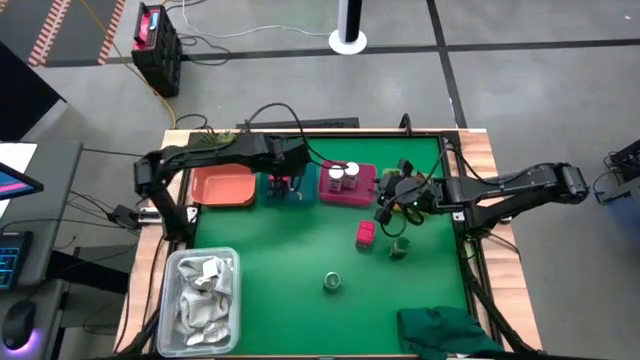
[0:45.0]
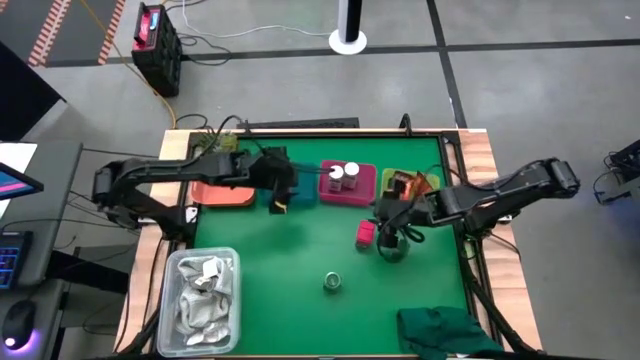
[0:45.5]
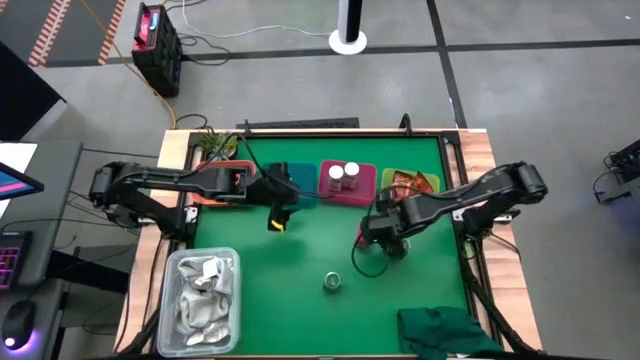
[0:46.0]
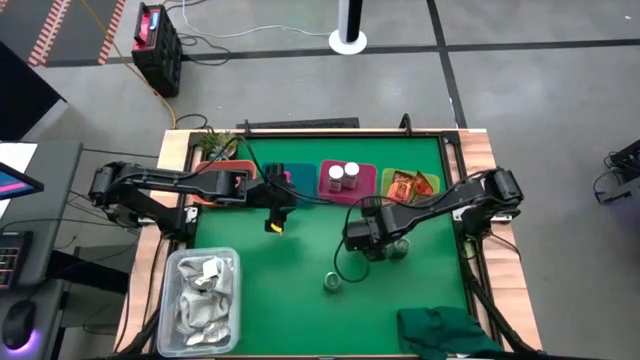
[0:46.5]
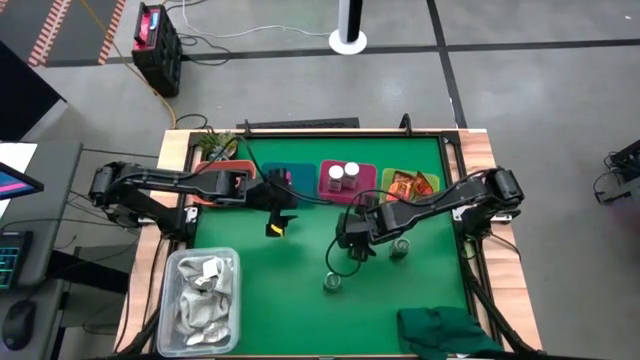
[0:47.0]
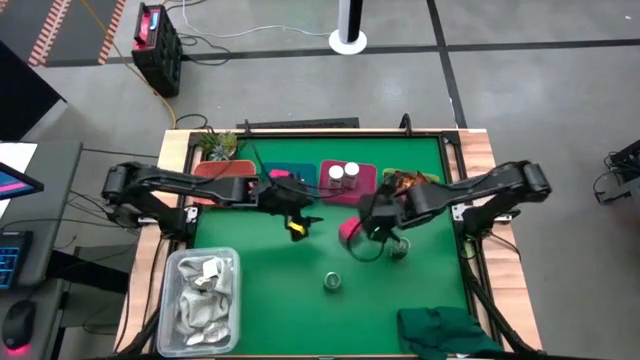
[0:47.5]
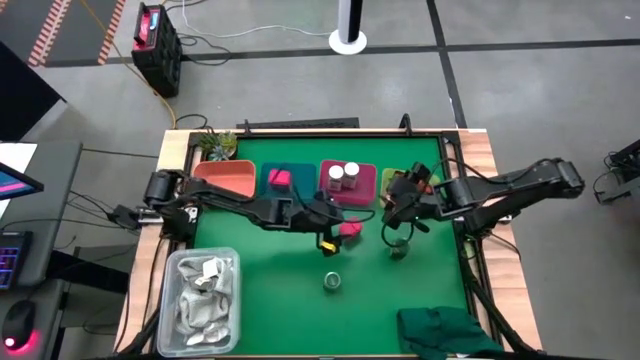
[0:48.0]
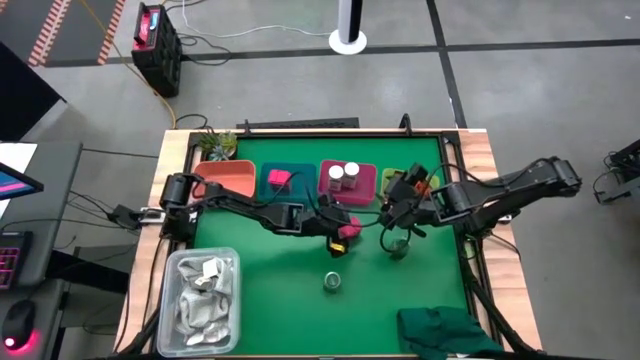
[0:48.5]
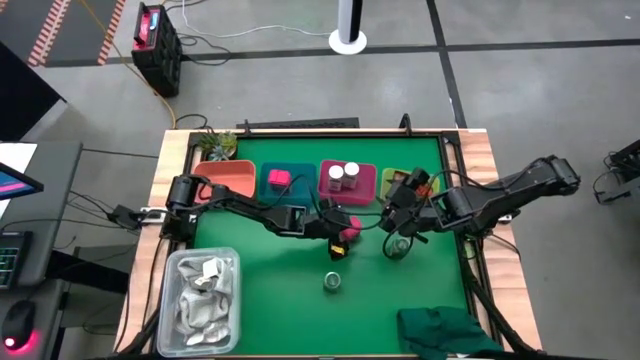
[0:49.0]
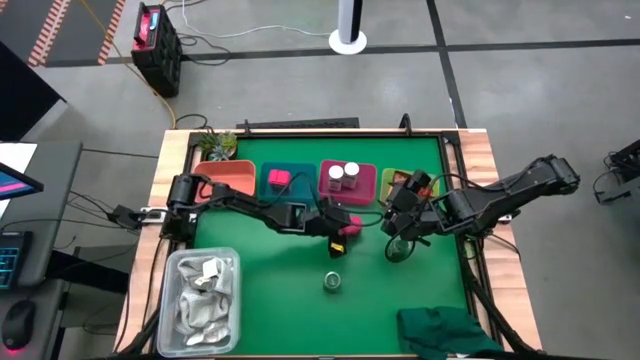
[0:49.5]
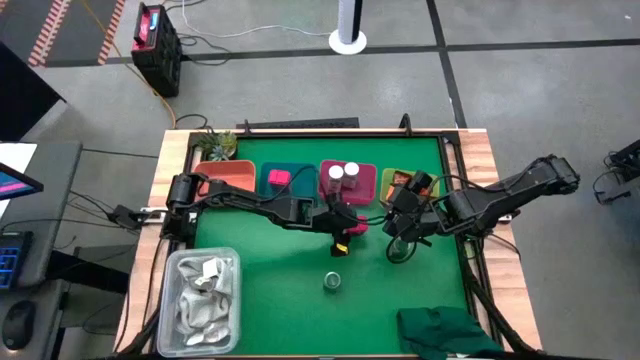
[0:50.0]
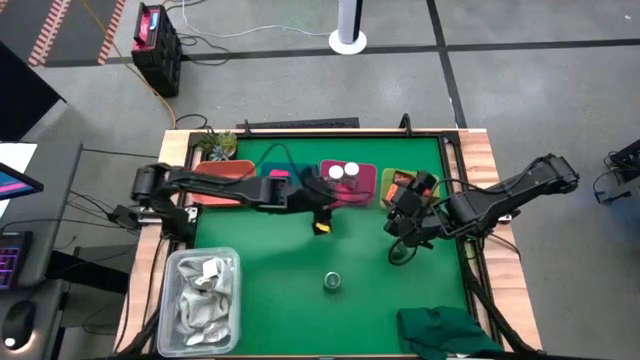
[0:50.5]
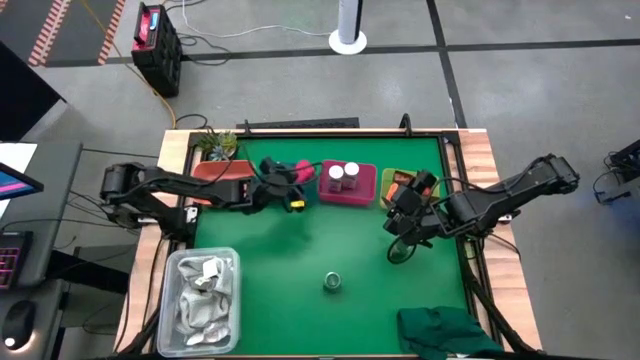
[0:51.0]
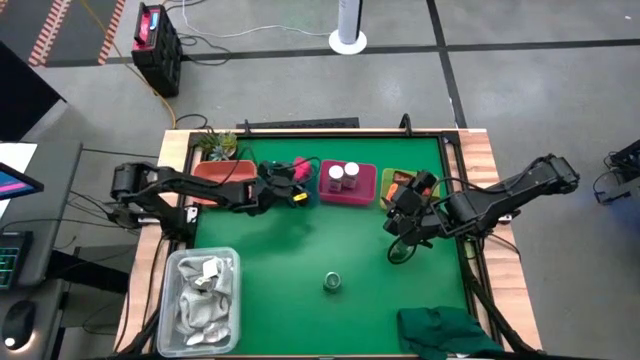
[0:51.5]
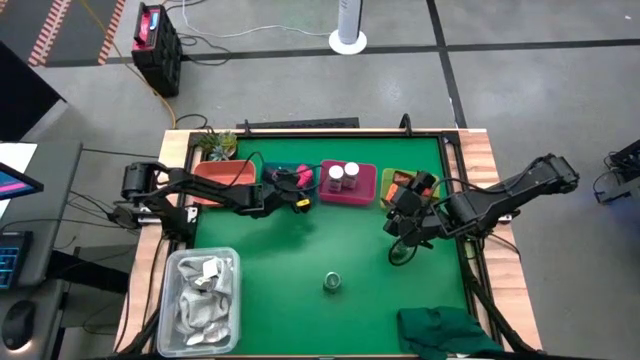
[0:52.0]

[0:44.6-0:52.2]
Task: Sort spices by type
Put the red seasoning can into the blue bin

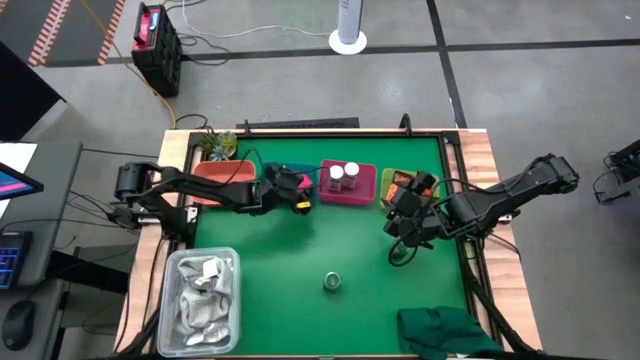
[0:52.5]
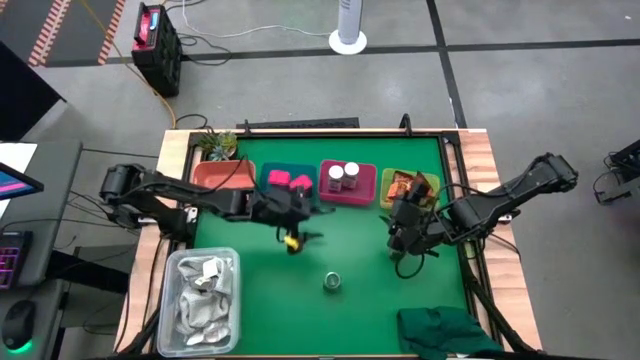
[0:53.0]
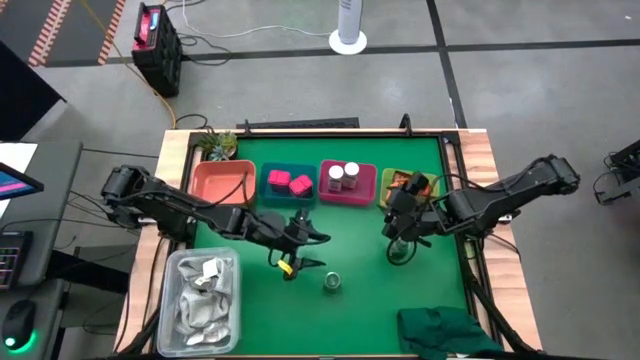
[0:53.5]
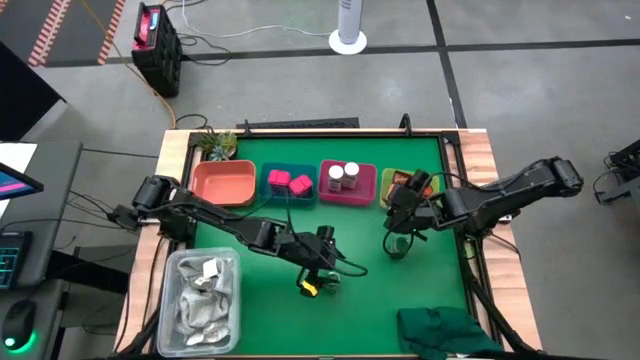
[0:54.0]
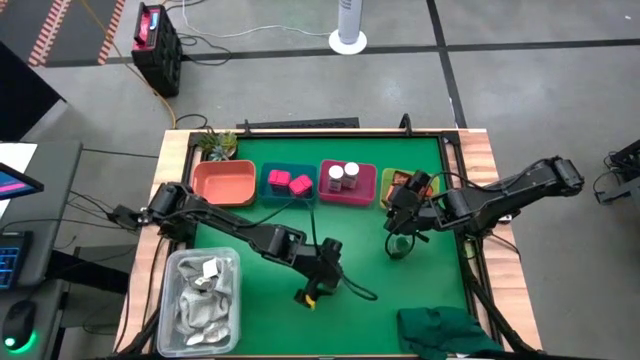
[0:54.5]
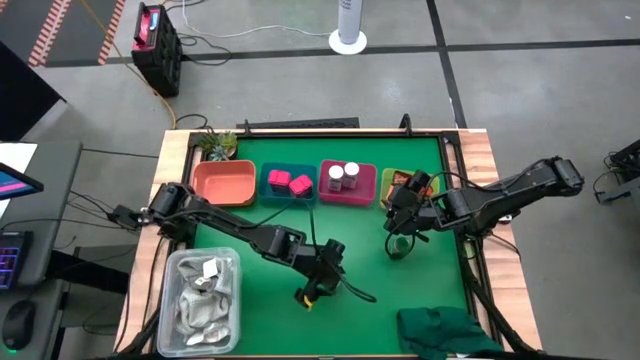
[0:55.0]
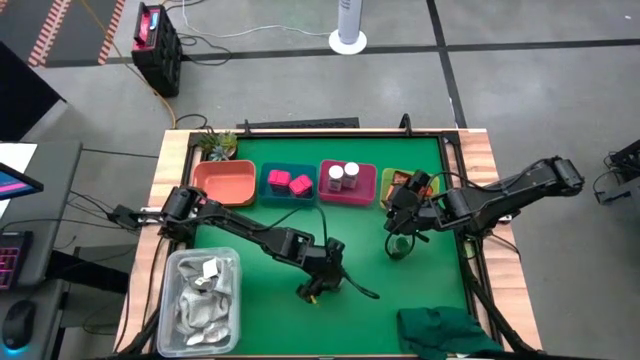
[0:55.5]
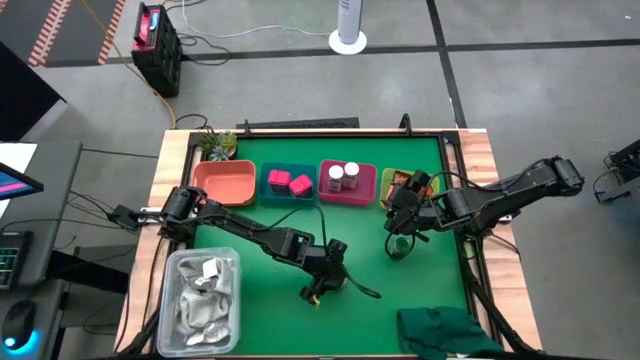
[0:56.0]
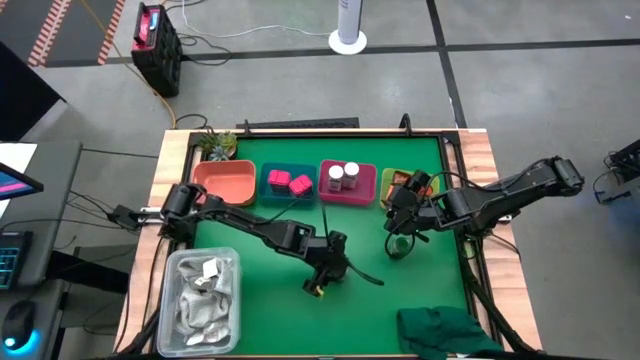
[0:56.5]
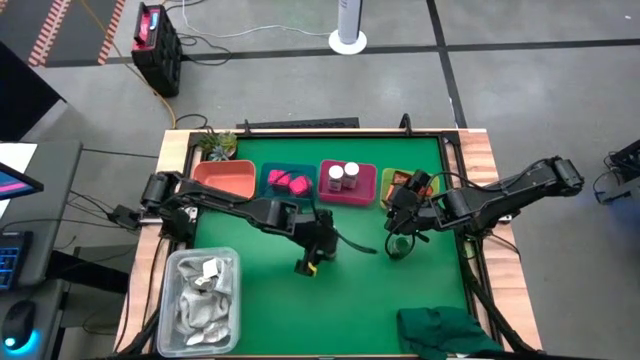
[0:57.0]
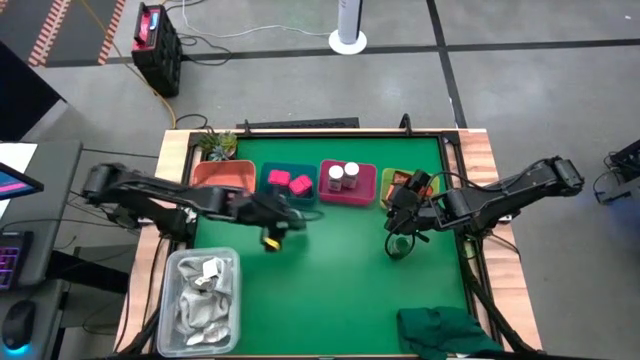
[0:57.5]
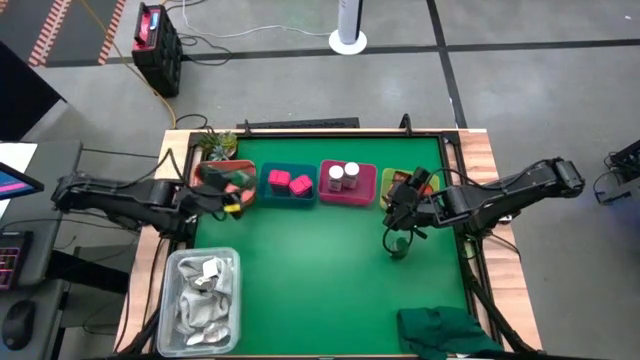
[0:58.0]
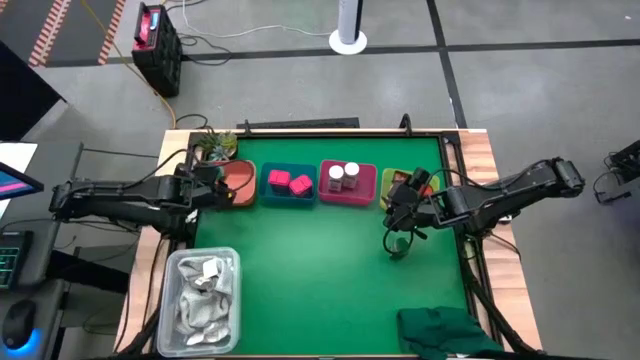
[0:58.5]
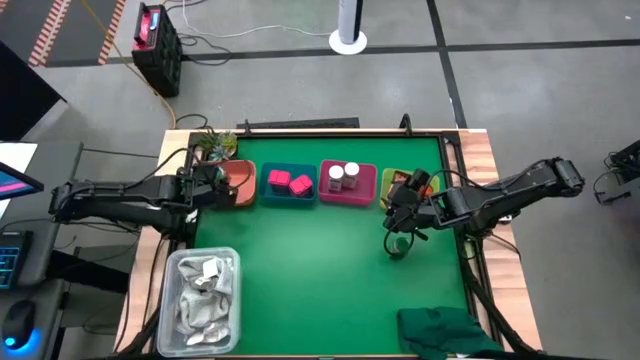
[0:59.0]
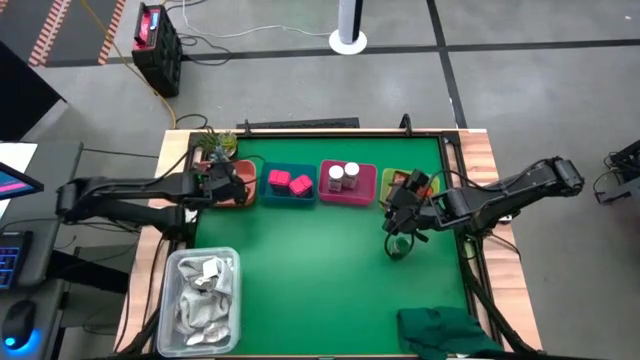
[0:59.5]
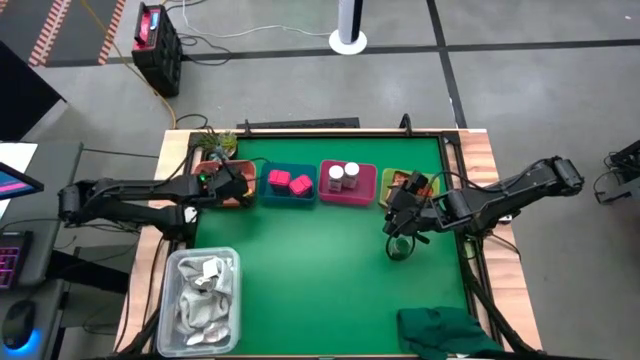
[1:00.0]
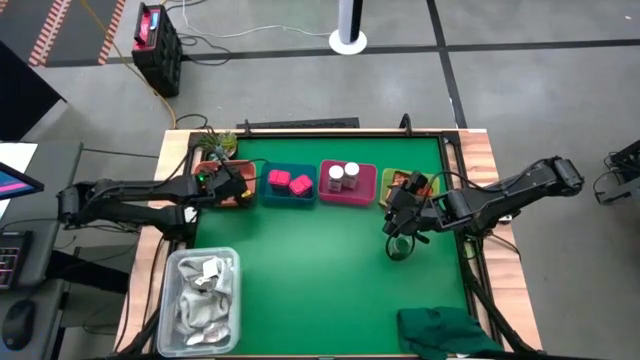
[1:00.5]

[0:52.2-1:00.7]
Put the left green seasoning bottle into the orange bin

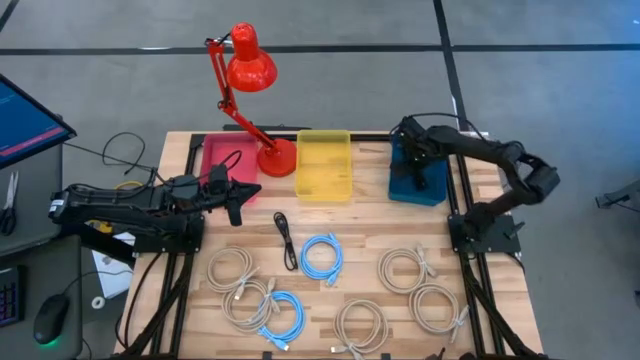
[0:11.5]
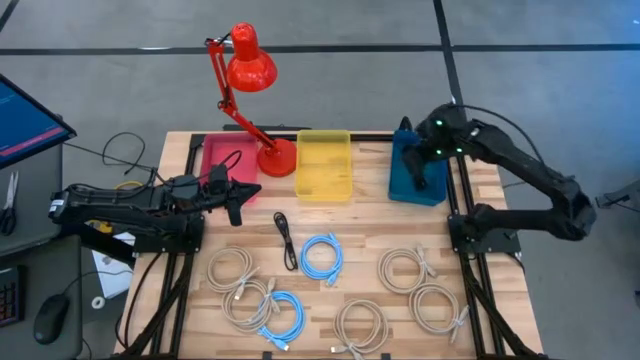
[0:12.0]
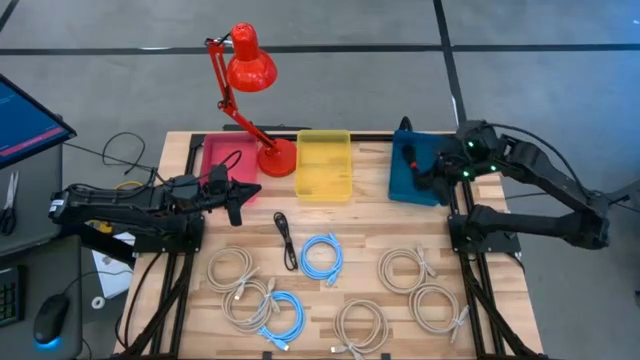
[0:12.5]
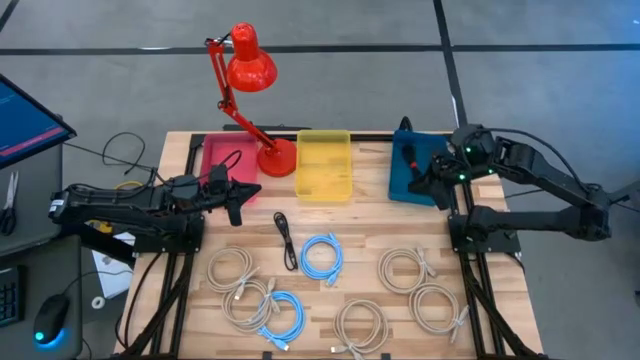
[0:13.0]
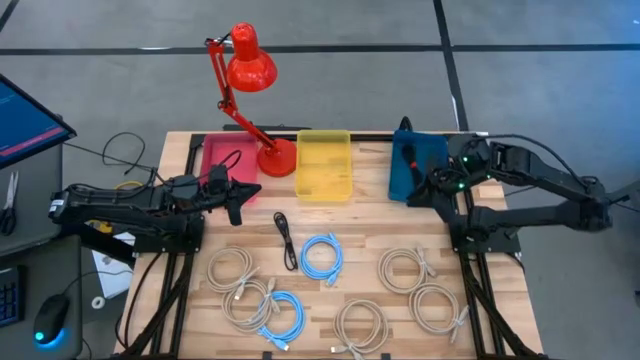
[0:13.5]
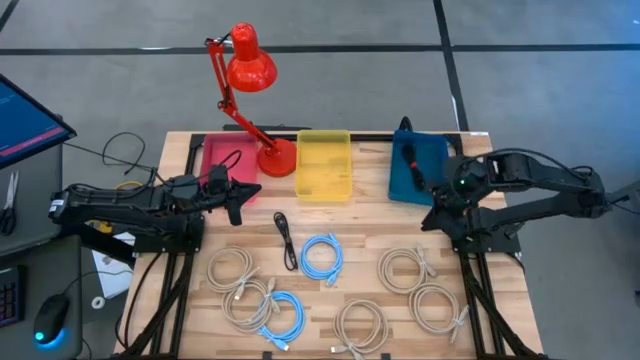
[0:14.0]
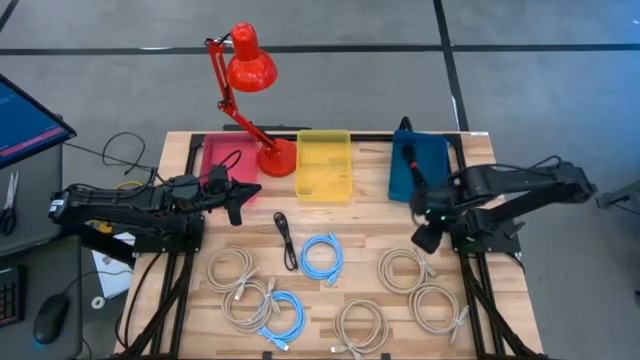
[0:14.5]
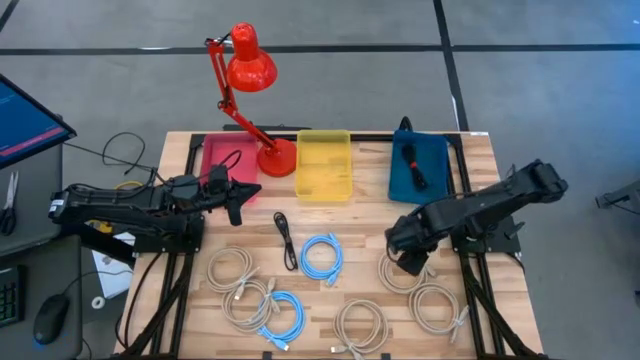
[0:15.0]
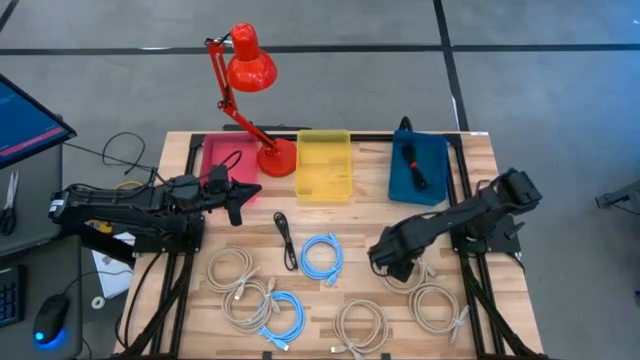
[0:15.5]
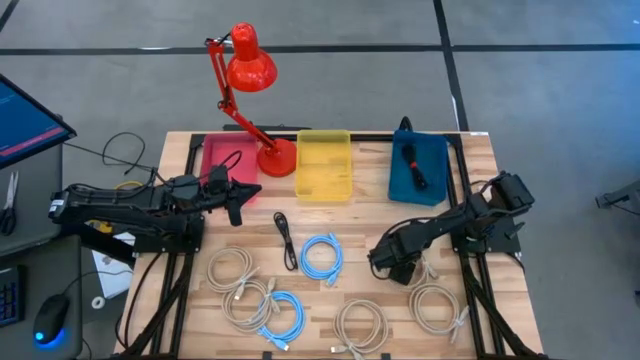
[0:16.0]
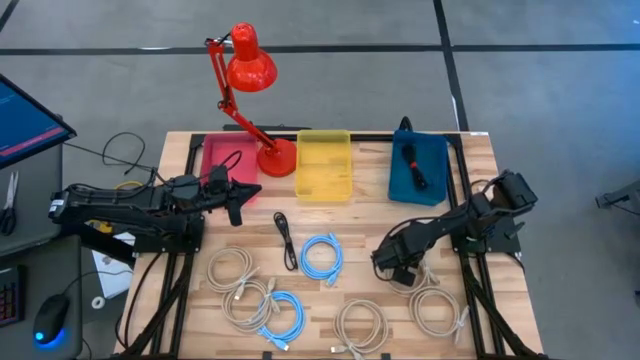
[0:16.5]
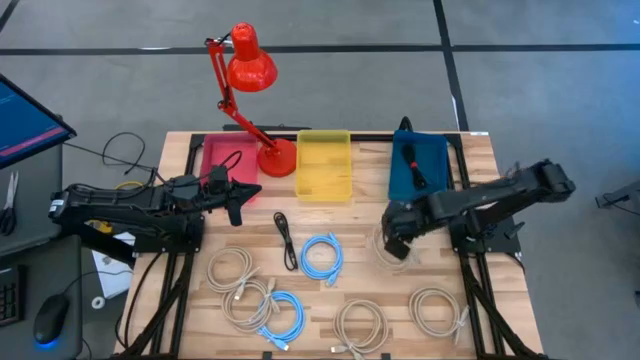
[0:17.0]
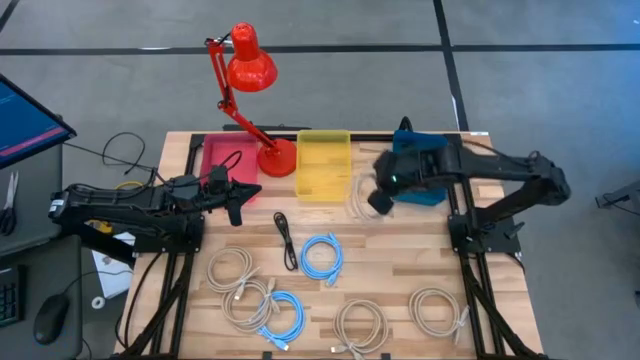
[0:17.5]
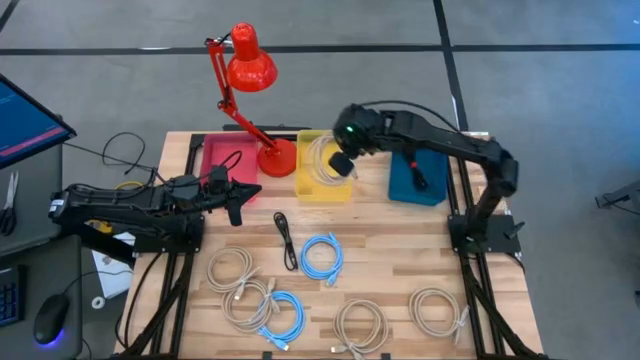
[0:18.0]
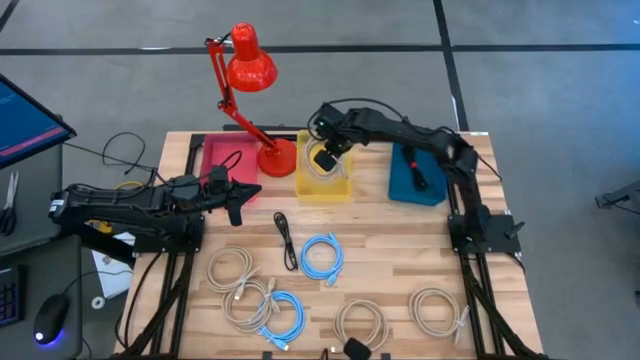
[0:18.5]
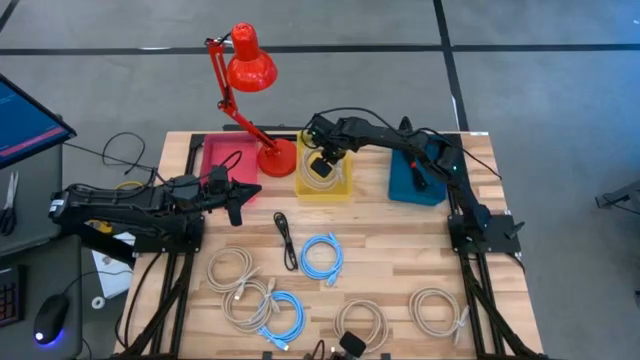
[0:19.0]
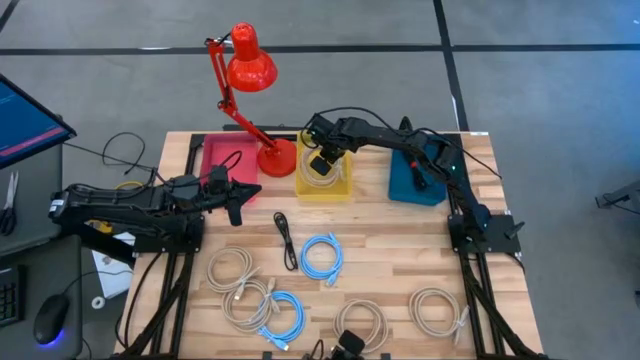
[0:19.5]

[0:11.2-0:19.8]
Task: Sort HDMI cables
Put the light brown HDMI cable into the yellow bin
